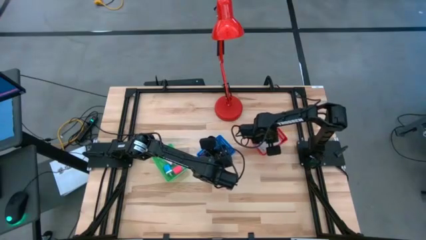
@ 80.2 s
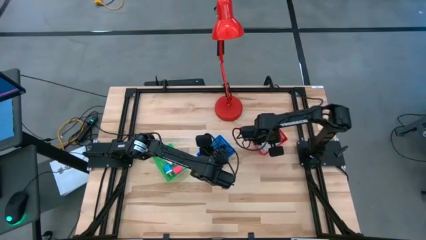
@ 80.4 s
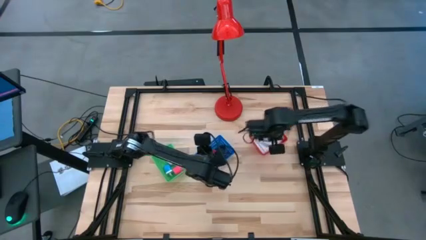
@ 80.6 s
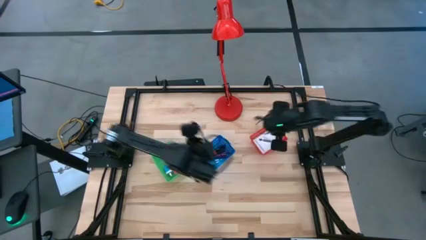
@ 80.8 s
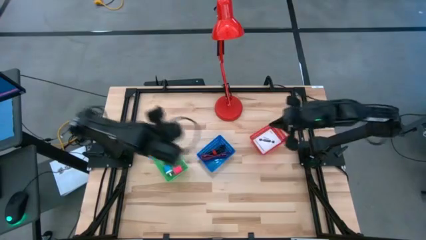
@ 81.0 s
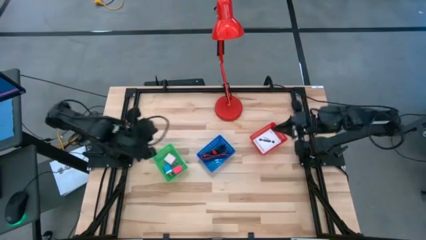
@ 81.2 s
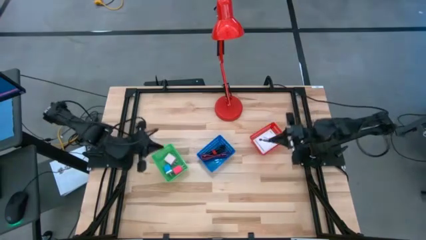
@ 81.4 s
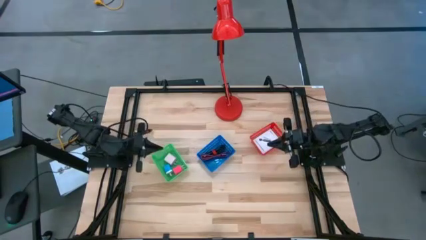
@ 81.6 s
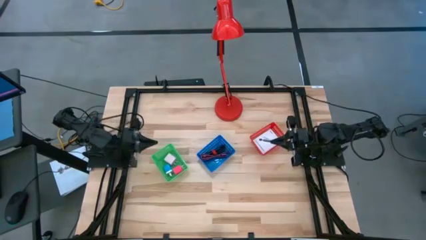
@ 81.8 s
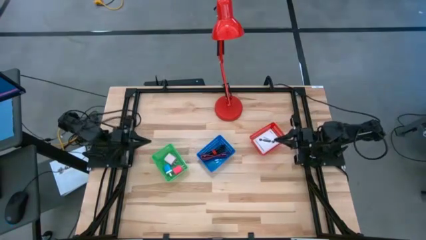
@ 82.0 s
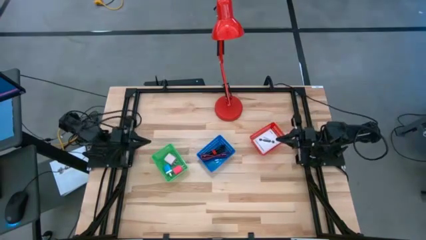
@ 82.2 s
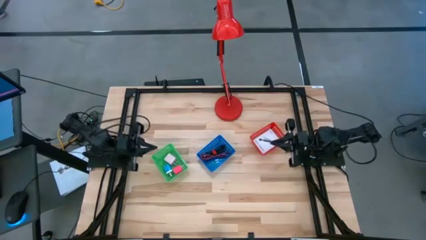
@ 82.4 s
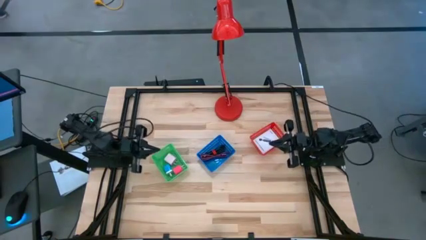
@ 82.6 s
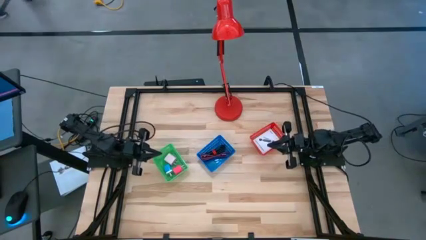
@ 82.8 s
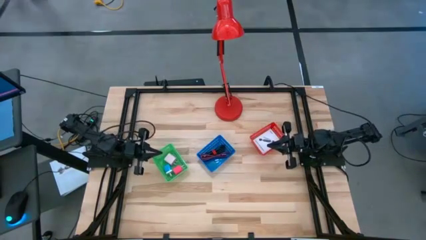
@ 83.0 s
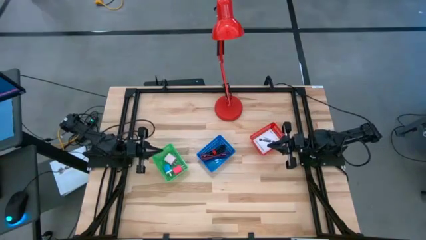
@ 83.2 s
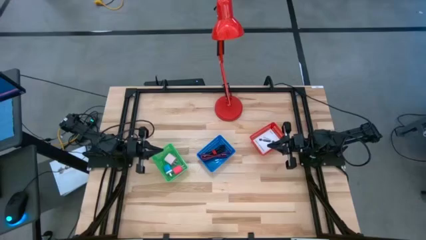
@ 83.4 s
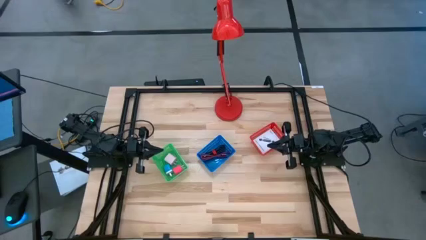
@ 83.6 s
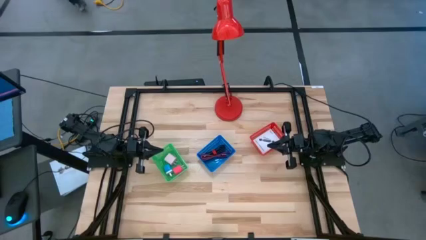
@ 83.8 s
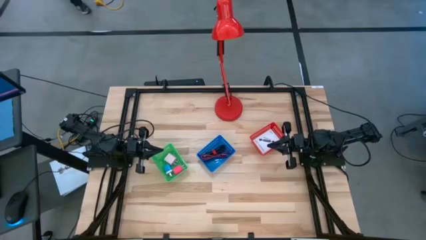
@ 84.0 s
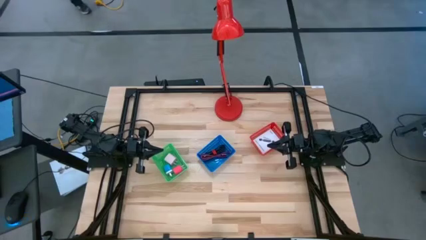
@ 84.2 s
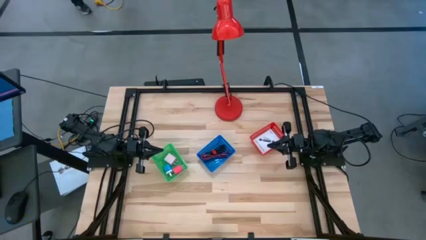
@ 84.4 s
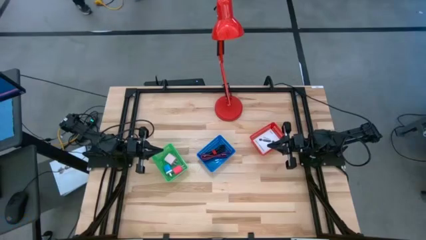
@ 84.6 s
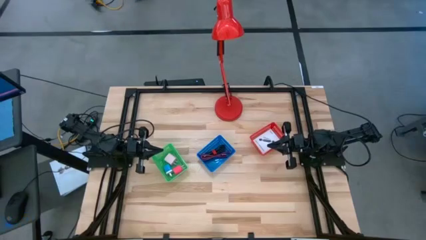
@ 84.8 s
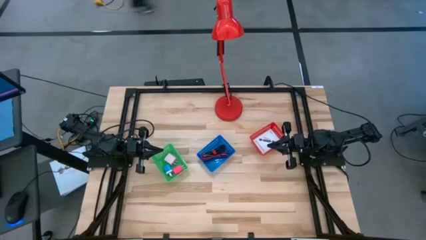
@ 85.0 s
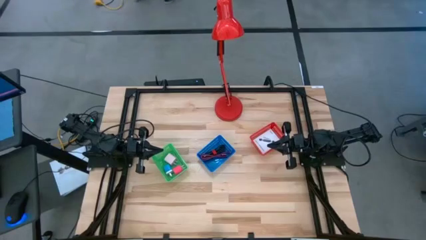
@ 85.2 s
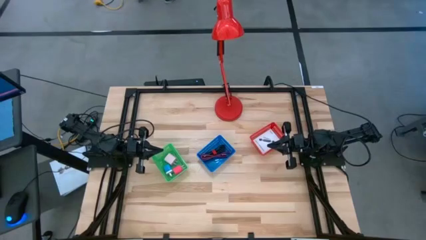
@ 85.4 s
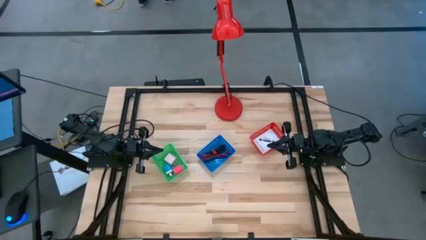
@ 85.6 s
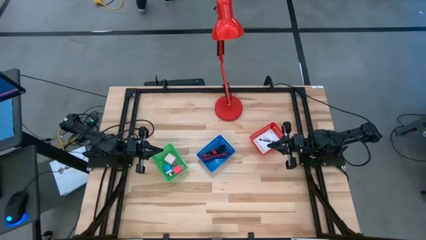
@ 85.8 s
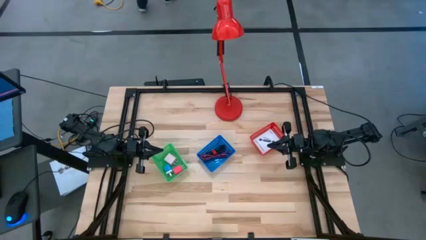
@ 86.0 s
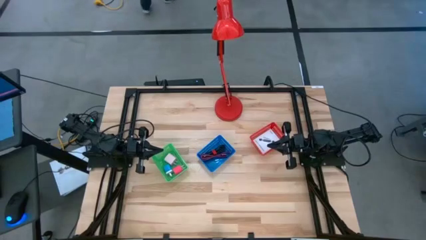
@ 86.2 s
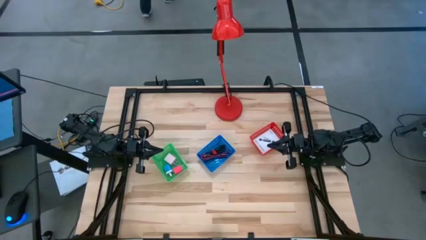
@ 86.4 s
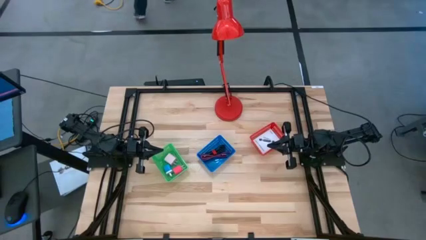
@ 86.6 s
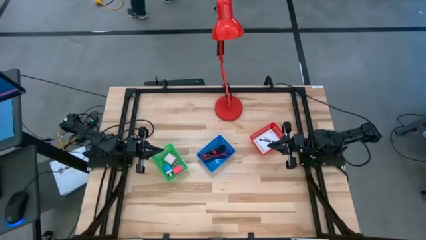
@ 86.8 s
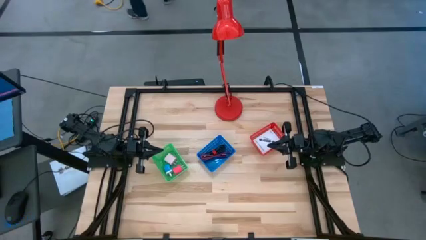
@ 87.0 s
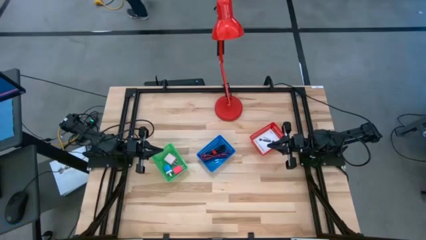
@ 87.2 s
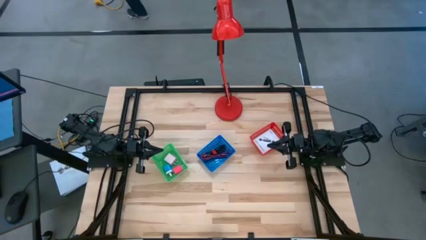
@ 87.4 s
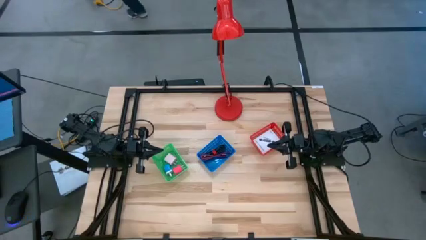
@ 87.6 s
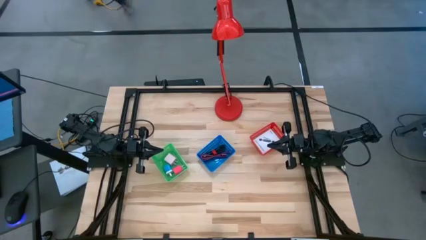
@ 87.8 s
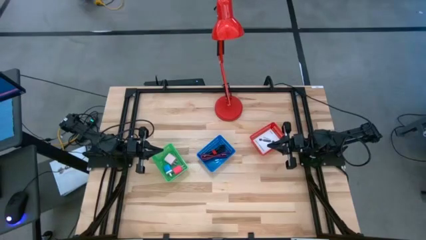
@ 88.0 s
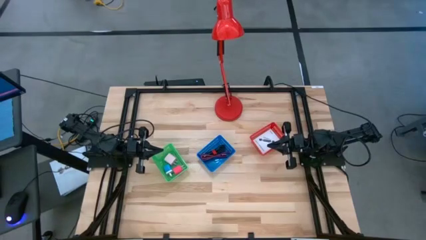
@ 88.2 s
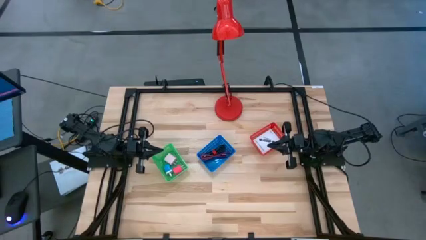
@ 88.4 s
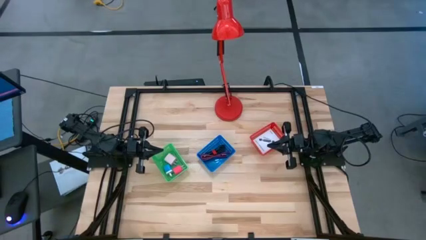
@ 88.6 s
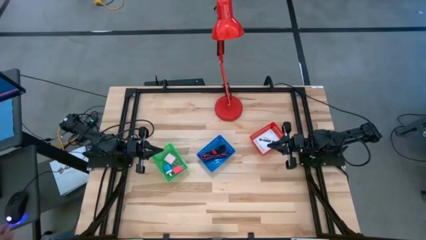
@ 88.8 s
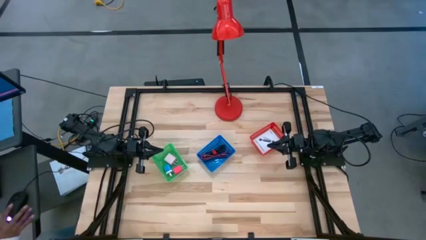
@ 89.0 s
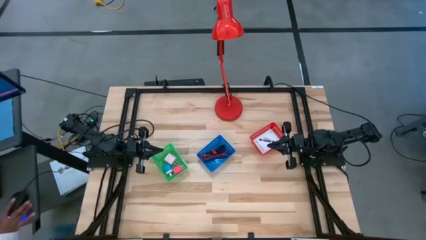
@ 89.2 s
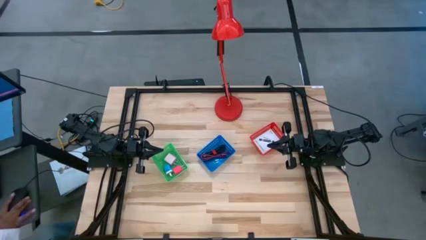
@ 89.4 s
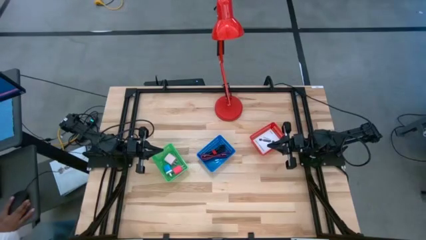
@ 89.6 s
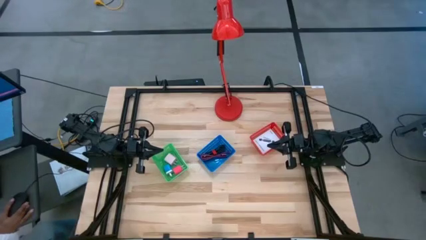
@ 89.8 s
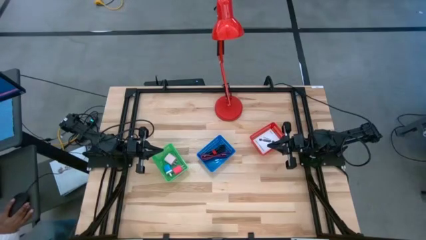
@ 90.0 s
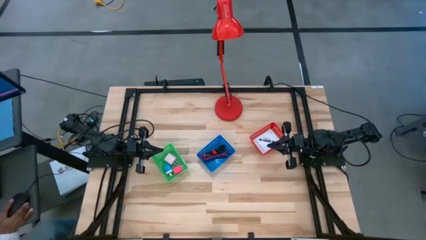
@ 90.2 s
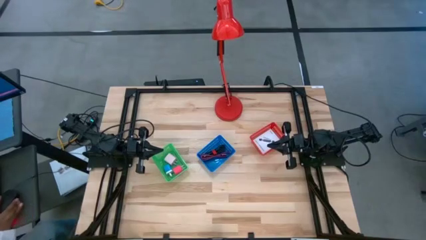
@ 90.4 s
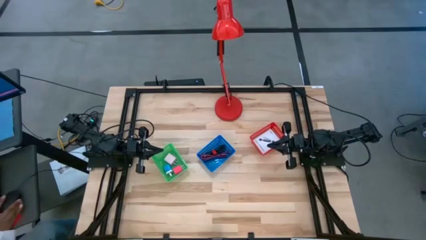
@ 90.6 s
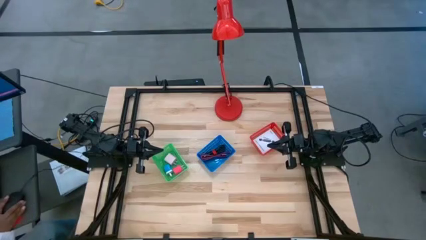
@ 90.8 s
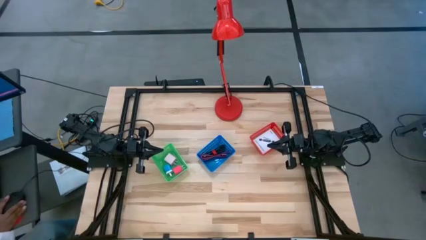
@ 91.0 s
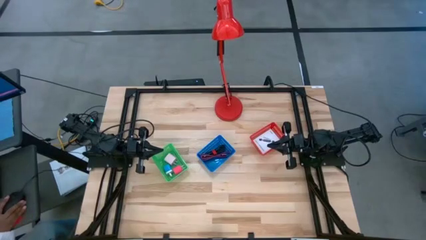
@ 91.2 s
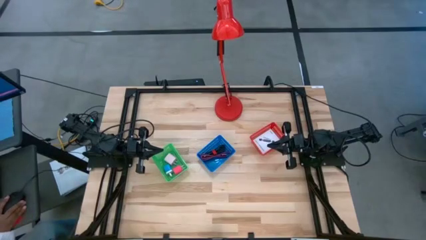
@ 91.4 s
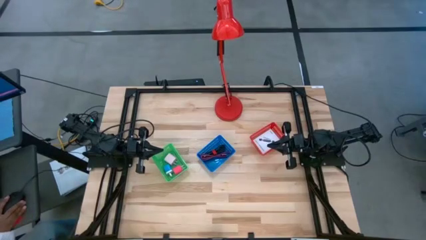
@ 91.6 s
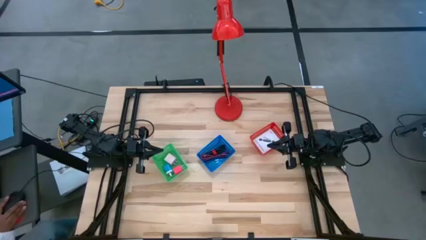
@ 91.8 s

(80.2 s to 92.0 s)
Task: Pick and place items into bin
Return to Home Position
